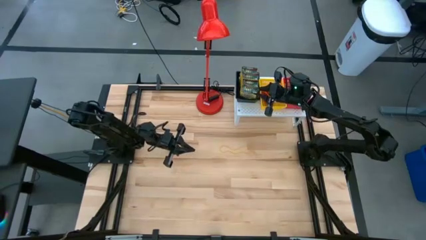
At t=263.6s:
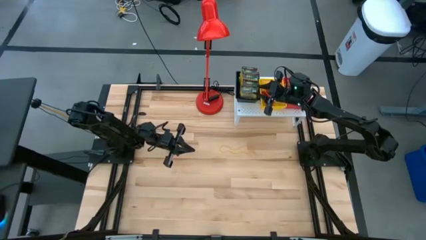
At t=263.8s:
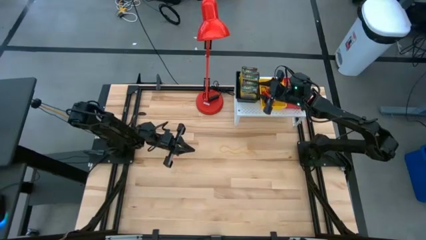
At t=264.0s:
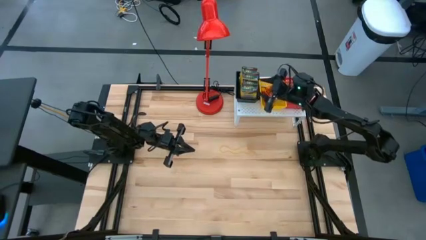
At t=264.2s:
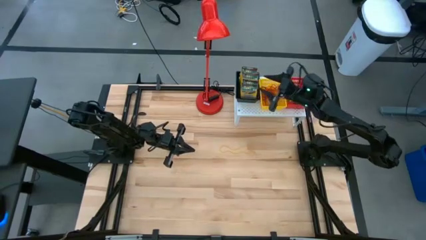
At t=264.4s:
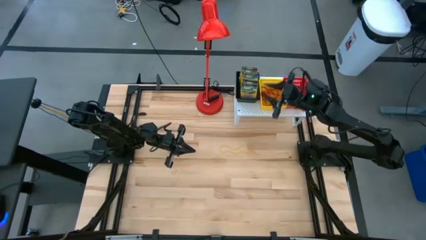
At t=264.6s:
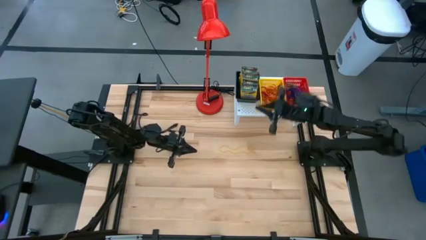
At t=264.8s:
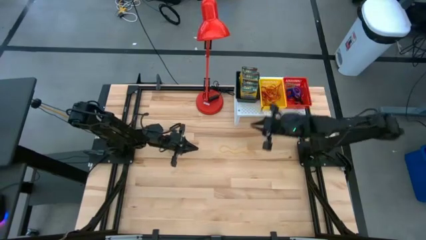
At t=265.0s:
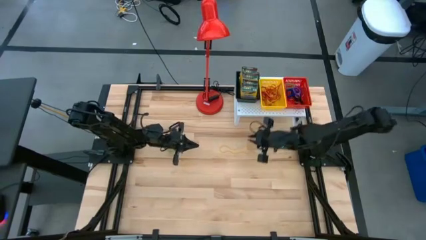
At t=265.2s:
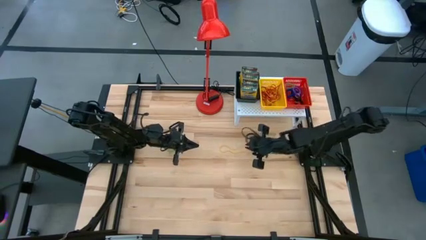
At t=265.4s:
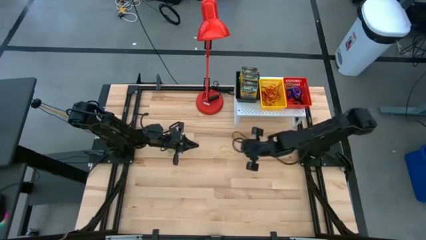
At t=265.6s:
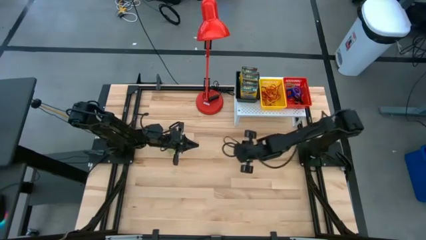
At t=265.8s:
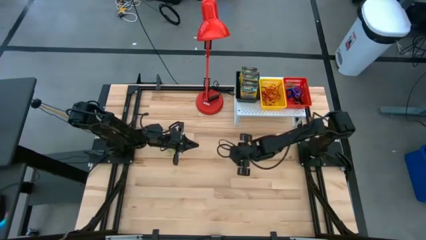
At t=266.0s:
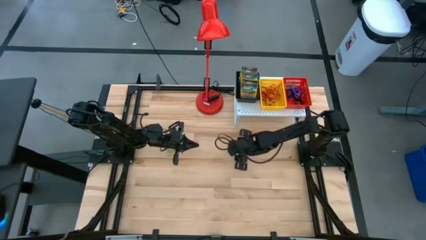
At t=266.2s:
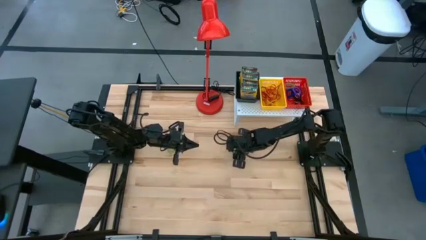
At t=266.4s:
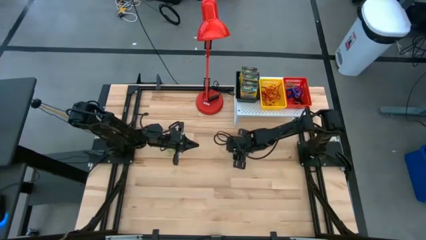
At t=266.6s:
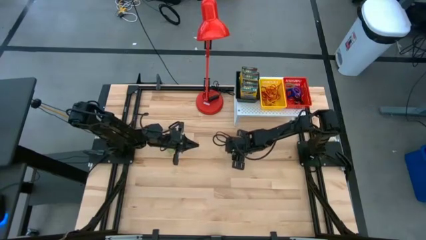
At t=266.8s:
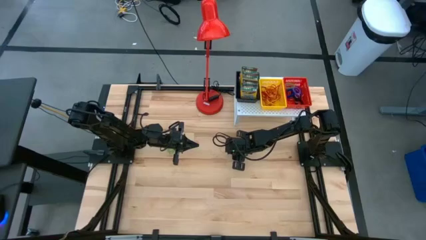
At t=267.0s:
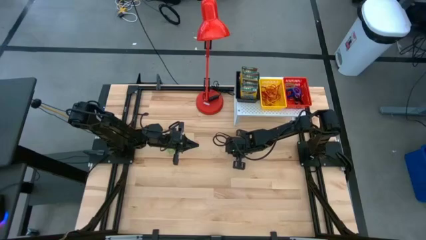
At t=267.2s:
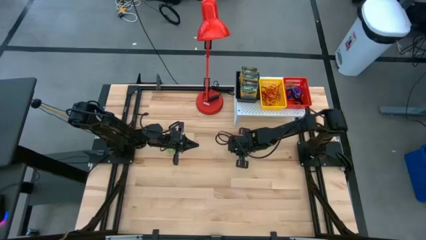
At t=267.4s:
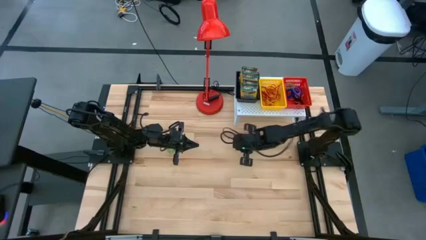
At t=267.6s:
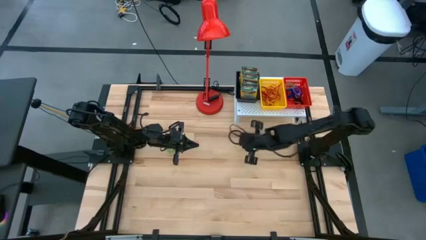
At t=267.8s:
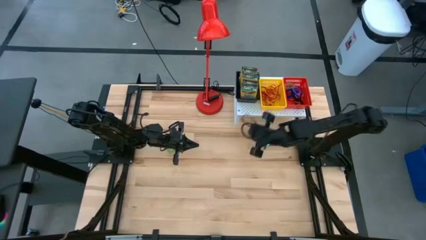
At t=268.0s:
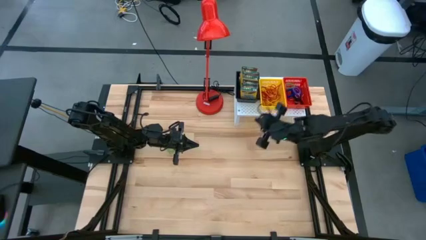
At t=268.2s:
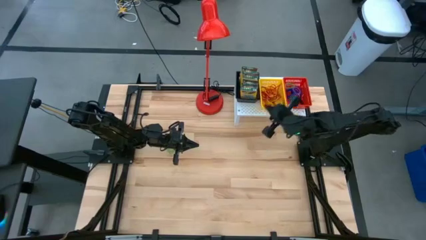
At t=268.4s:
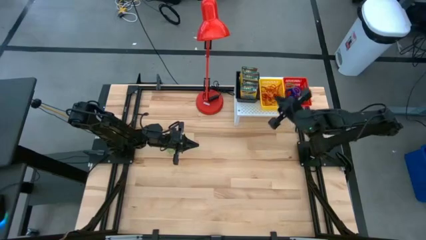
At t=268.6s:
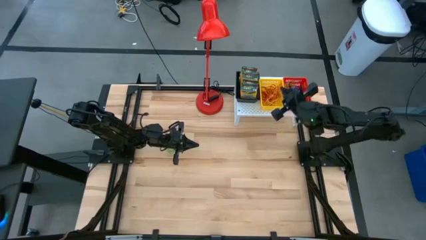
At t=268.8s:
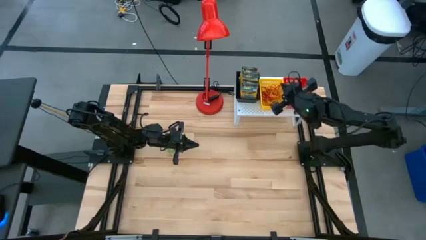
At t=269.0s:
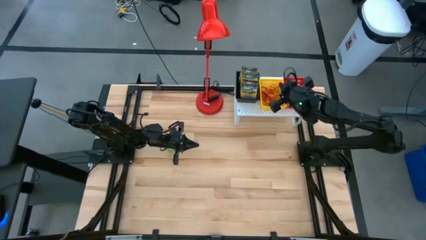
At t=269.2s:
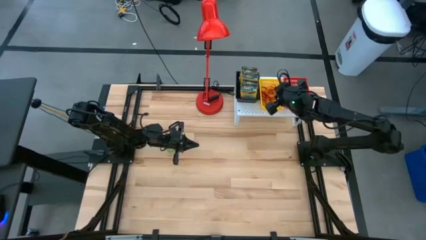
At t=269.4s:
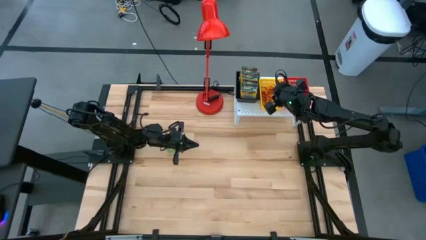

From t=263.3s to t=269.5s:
Task: Pick & Place Office Desk Supplies
Put the yellow rubber band into the yellow bin

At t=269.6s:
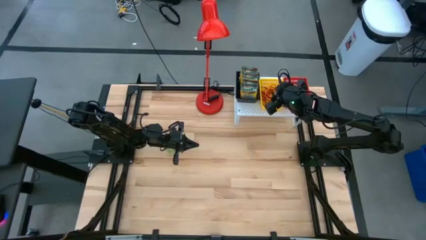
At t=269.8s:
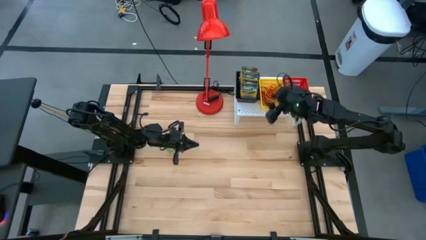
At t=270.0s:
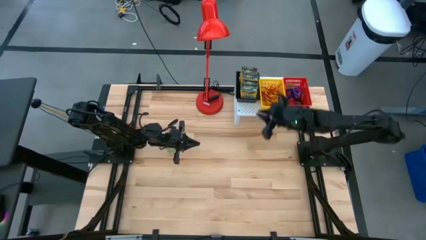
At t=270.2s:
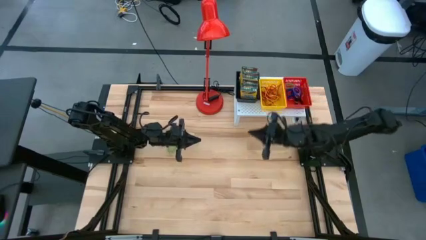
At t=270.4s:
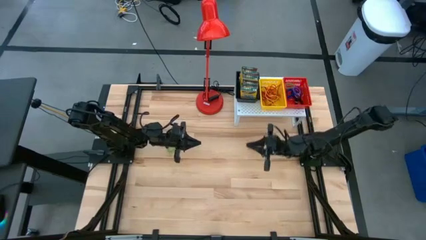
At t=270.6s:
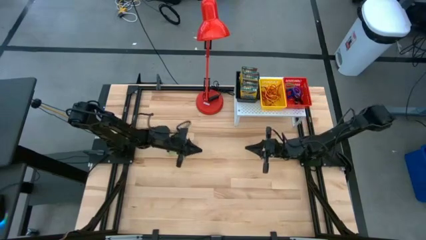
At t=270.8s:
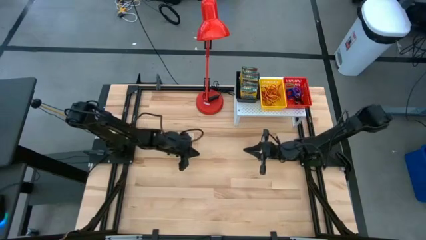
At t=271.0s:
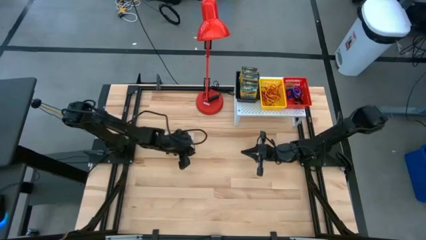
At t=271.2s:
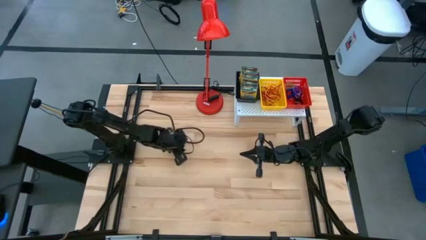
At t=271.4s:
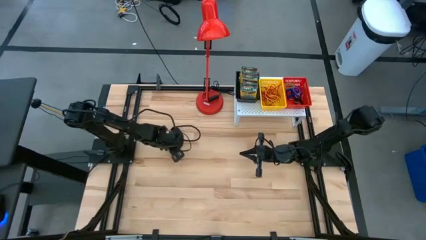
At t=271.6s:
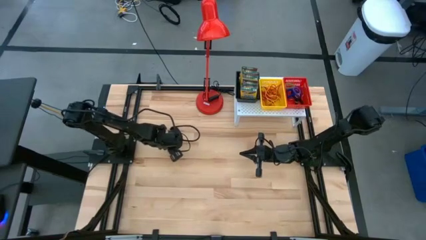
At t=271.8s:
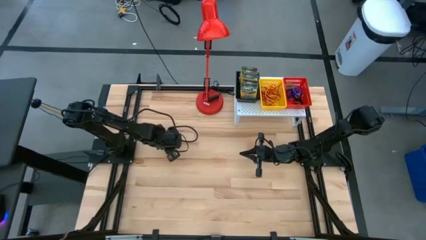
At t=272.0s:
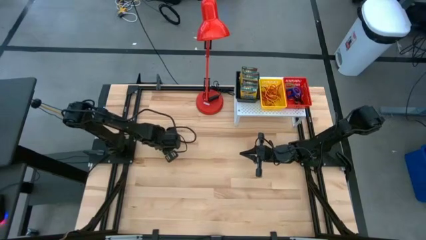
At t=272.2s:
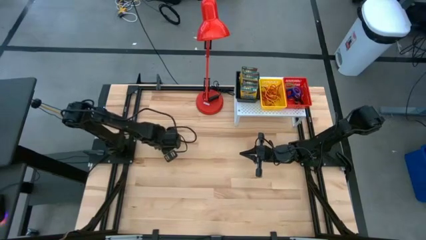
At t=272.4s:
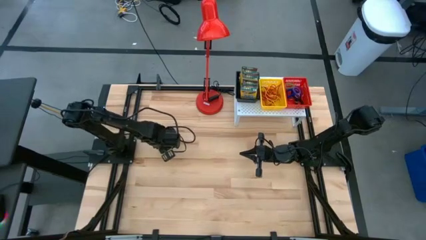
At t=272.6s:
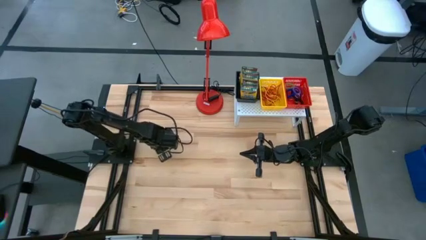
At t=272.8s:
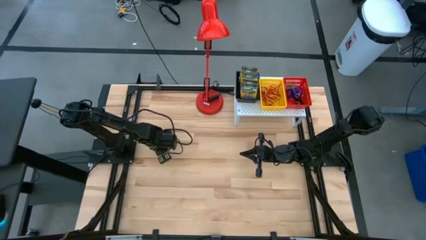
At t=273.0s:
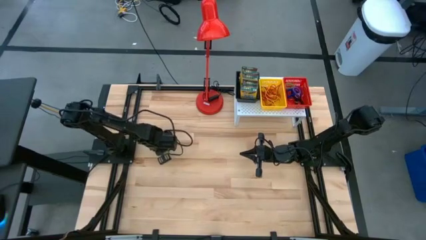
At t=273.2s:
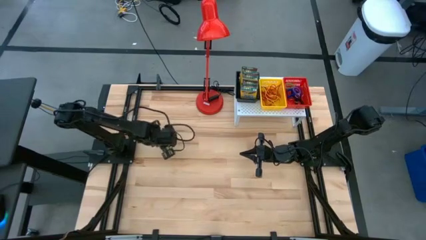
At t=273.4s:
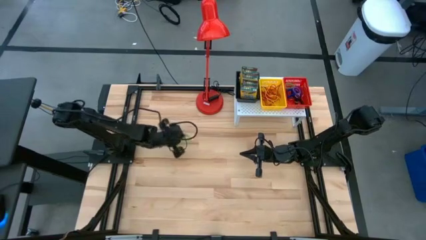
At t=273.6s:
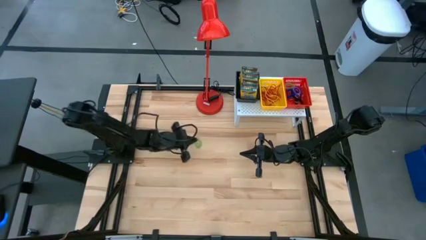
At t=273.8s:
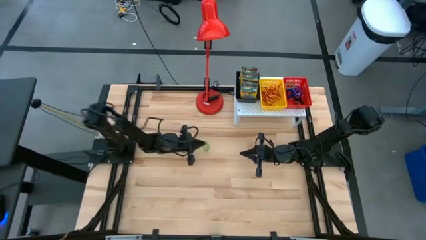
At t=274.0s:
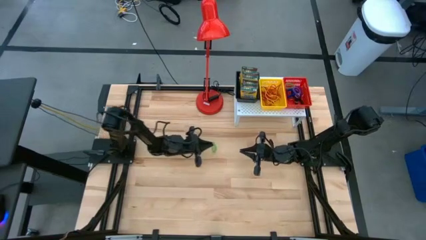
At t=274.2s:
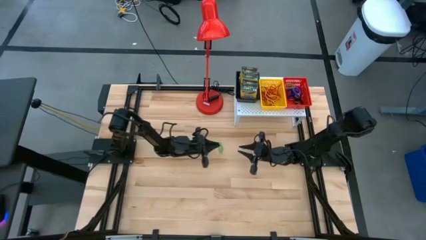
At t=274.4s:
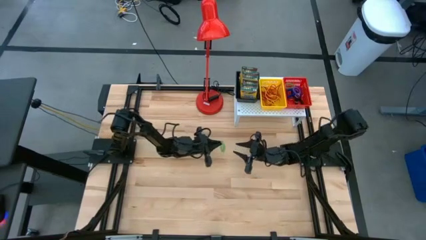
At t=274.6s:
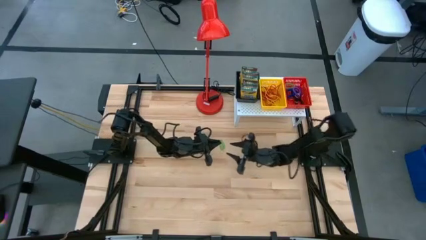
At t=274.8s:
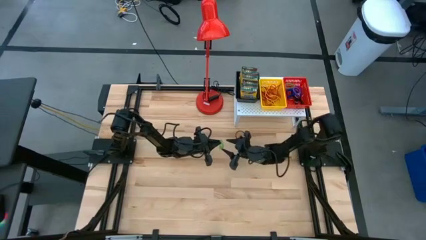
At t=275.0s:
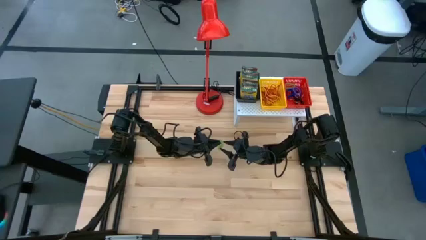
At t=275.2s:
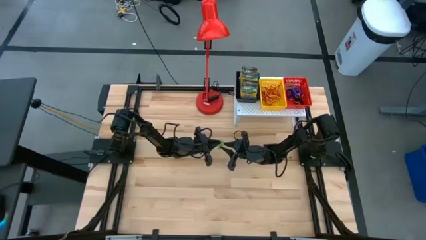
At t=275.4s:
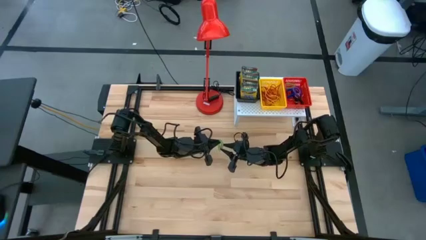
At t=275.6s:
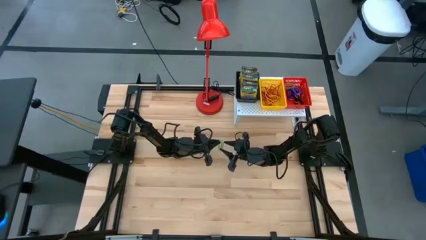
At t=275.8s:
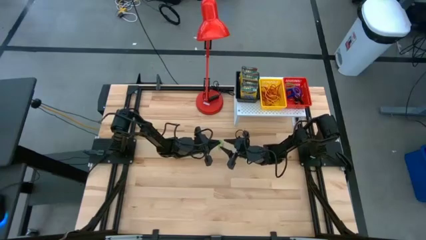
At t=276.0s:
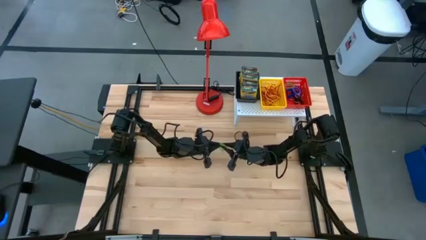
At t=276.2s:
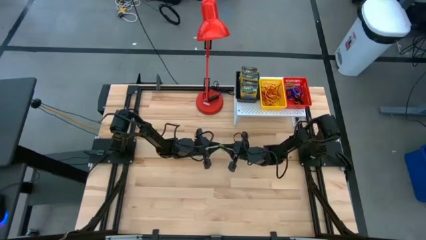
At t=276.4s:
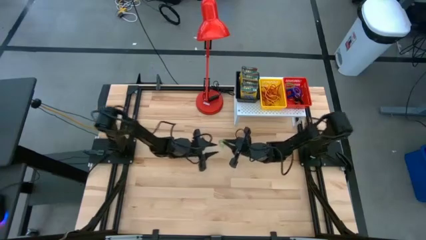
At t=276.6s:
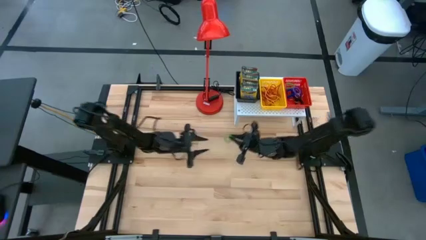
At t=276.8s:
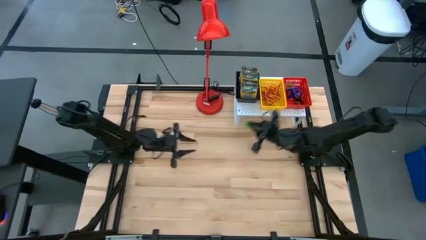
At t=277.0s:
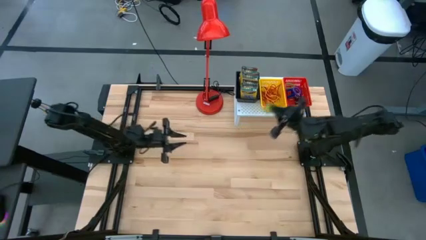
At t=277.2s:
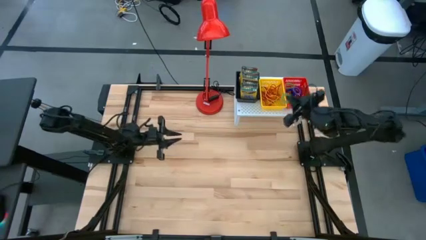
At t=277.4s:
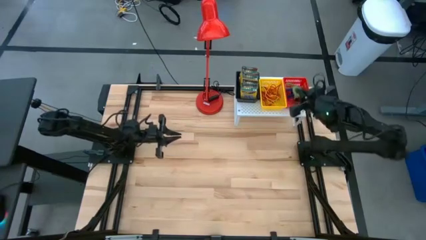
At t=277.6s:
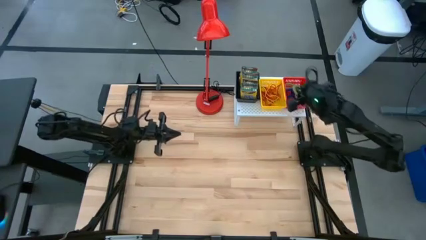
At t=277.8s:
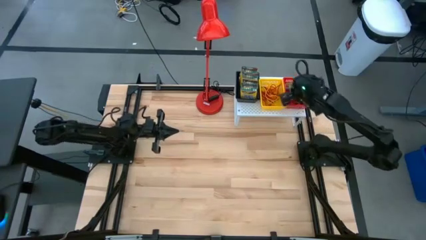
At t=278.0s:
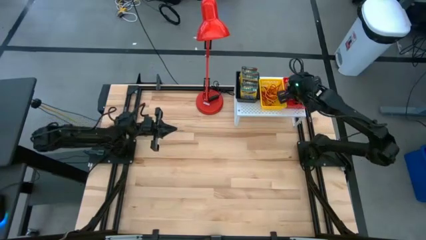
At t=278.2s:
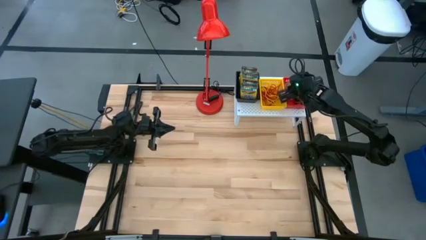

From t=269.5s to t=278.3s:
Put the green spring keychain into the red bin
